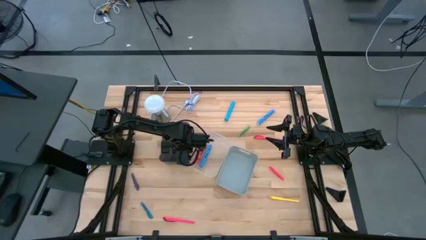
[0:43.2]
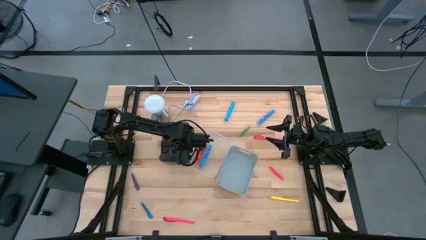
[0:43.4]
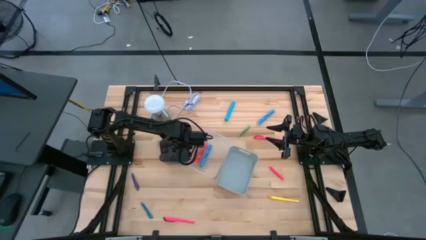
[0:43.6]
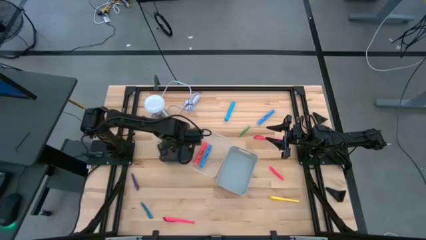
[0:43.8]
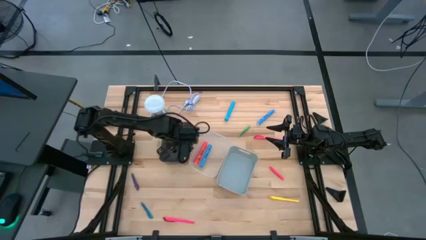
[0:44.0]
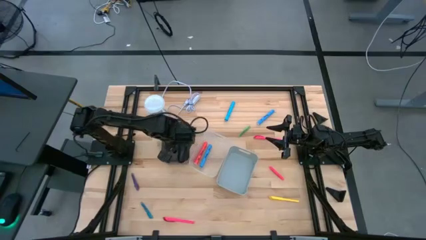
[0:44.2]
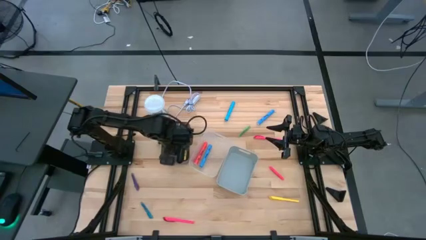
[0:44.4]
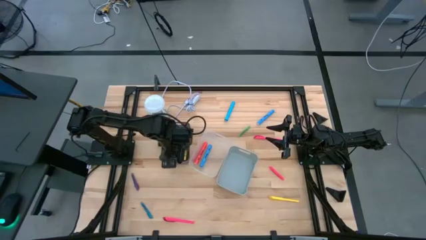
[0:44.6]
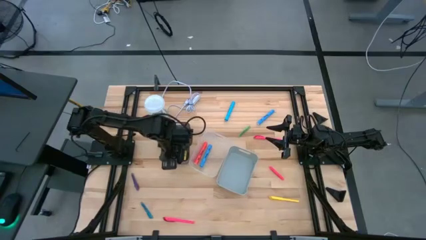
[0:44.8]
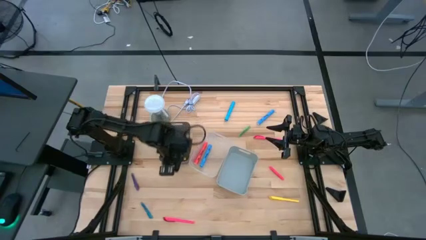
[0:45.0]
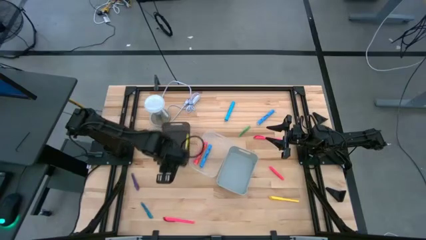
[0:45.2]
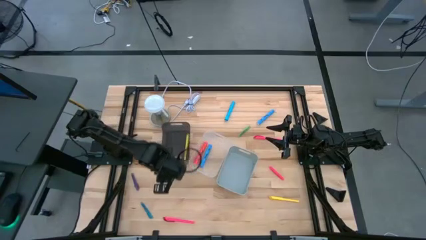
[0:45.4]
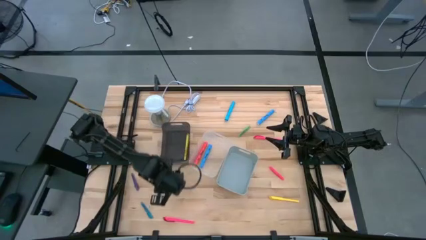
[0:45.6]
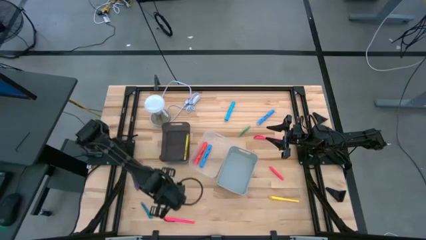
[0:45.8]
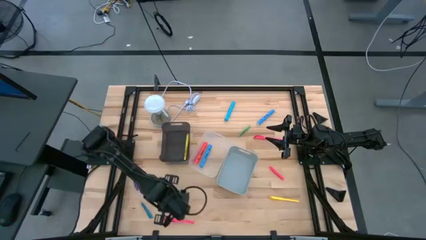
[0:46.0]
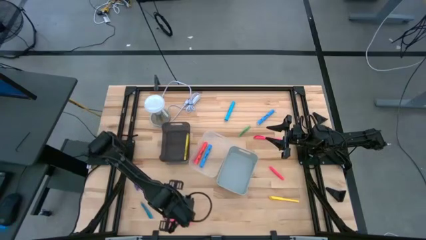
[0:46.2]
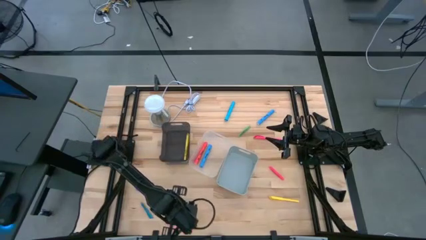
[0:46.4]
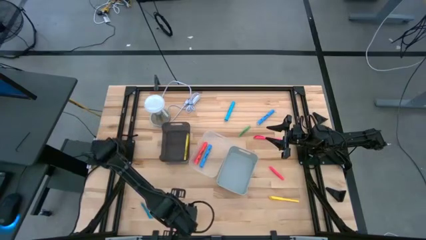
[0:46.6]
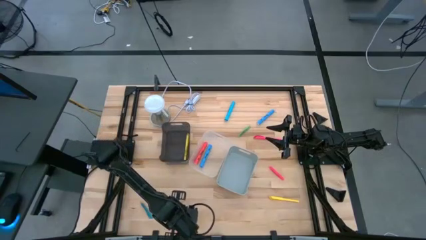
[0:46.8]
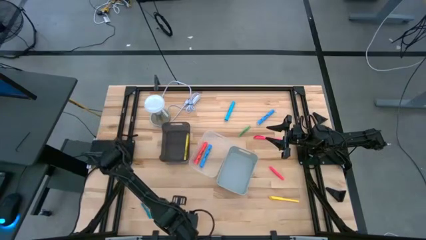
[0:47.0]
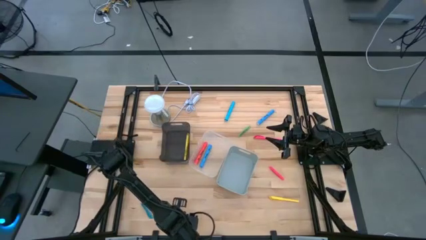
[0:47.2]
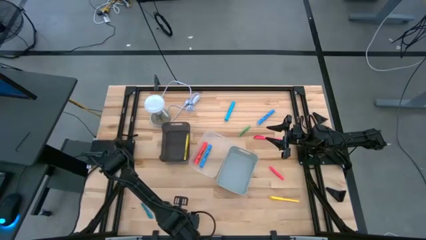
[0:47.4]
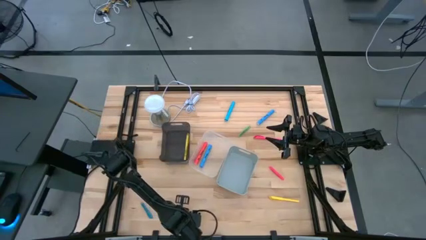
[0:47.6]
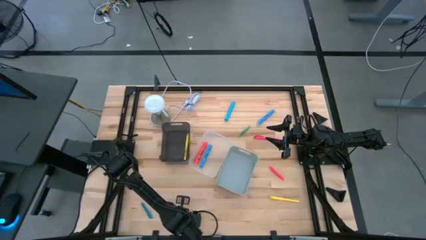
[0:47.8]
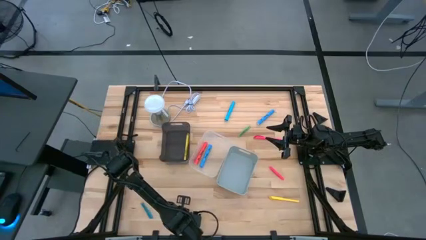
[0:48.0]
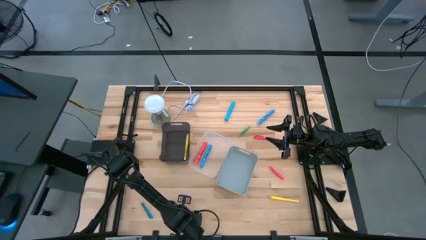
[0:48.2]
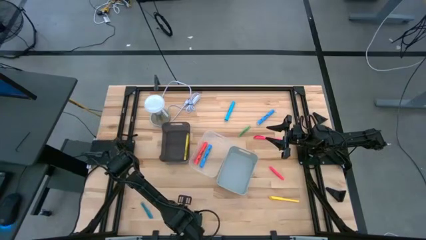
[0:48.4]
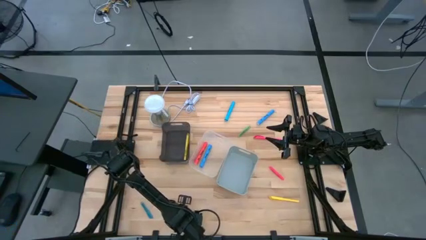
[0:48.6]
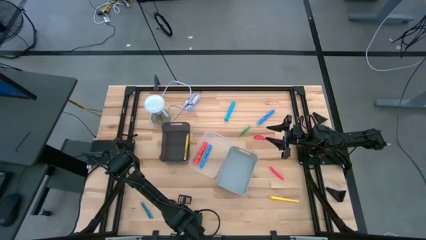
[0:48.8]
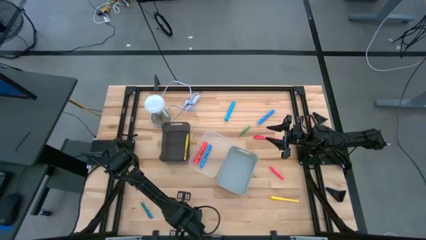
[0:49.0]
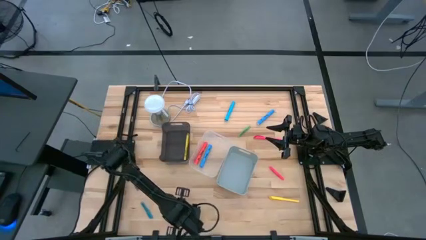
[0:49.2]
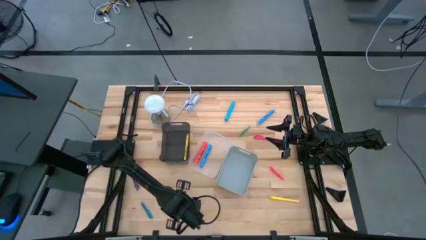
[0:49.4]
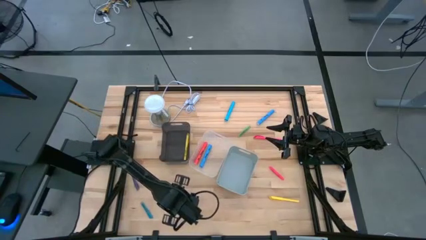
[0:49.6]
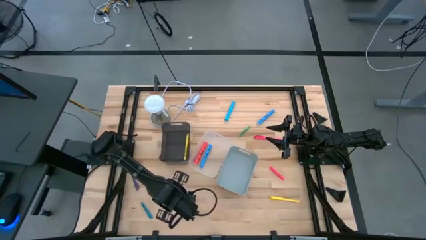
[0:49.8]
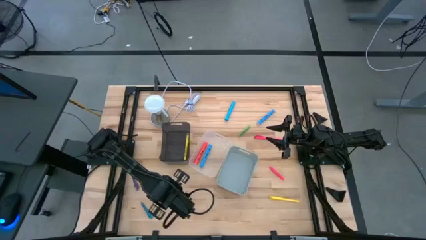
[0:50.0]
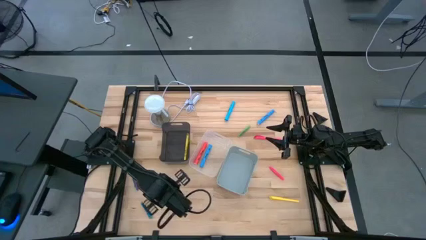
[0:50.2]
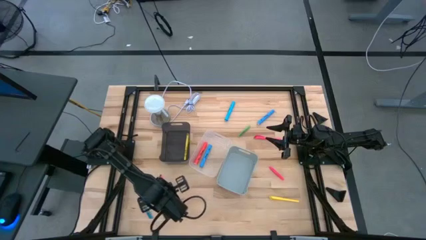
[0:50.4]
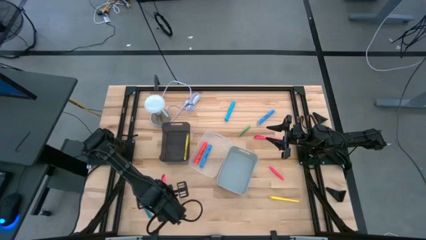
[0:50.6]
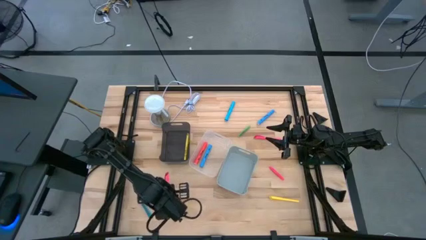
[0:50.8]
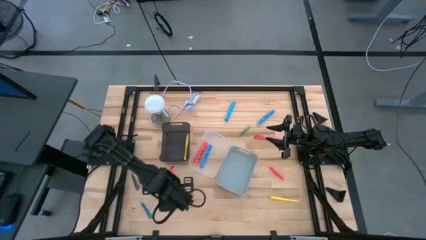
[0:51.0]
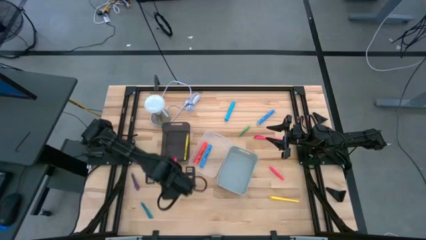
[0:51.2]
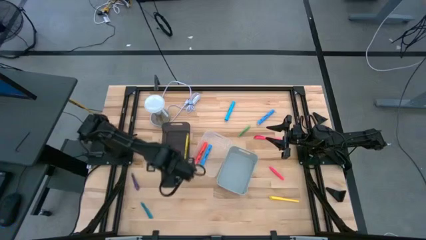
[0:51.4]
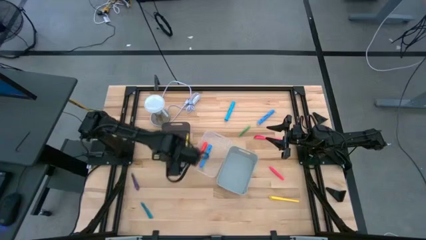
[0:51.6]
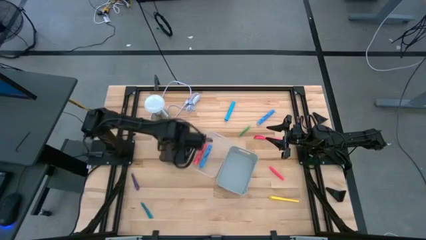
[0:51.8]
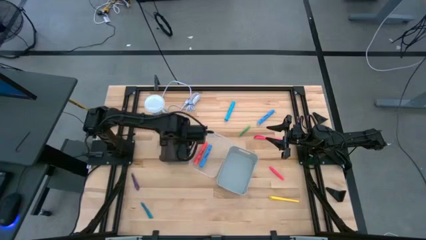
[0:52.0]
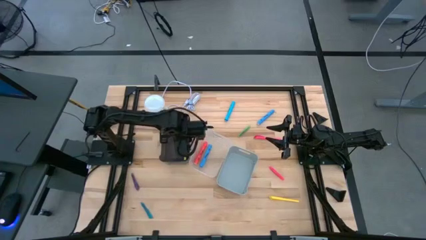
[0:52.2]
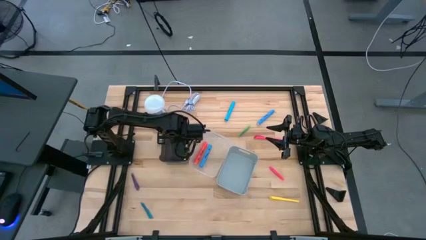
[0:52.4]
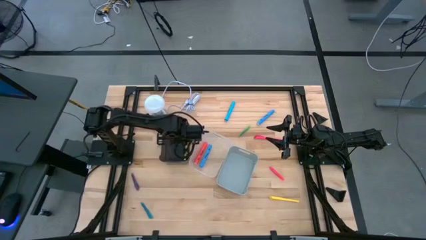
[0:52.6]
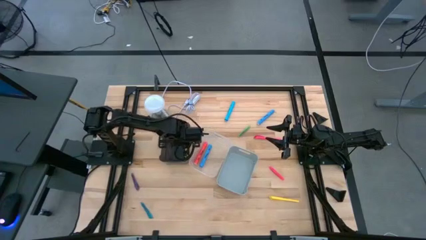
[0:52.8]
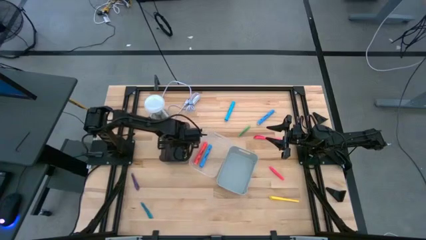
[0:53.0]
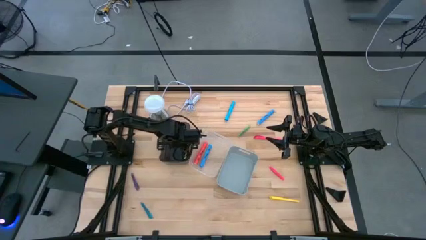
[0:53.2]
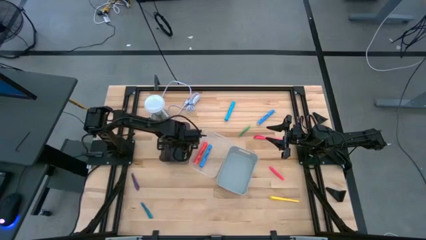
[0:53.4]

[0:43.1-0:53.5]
Task: Pick & Place Markers
Put the bottom pink marker into the black bin

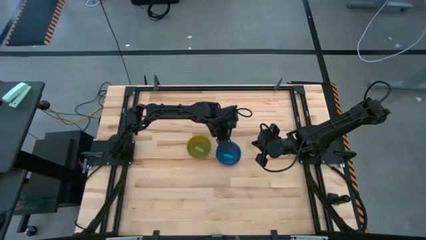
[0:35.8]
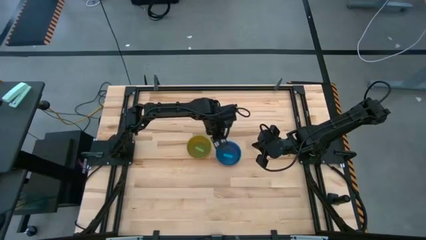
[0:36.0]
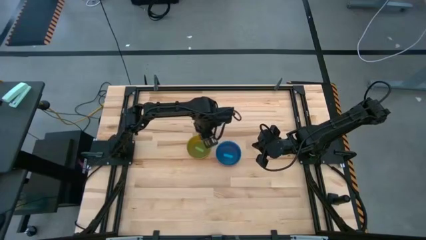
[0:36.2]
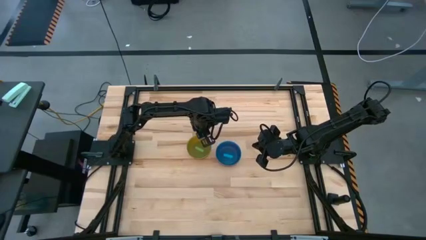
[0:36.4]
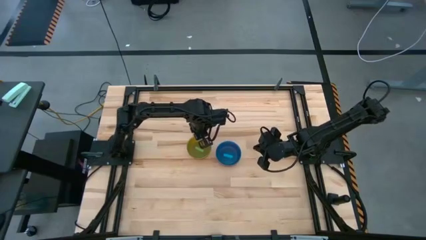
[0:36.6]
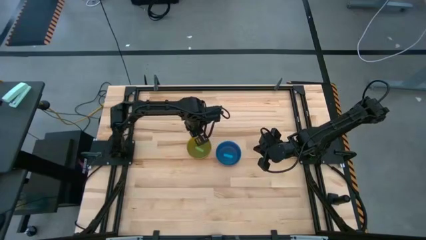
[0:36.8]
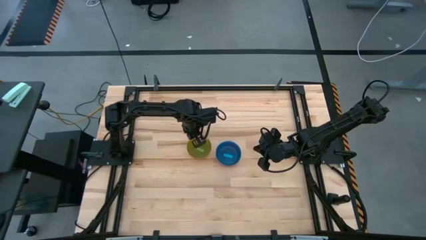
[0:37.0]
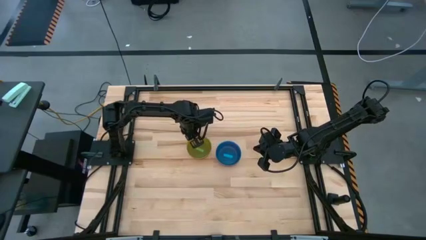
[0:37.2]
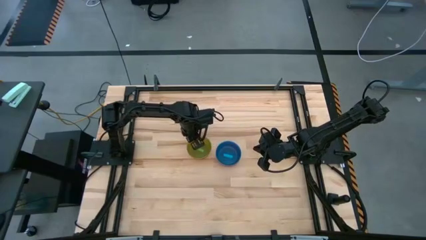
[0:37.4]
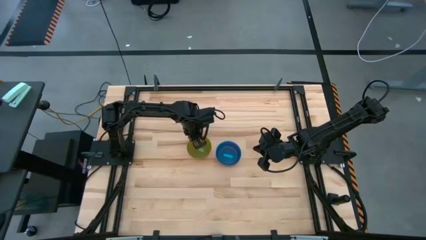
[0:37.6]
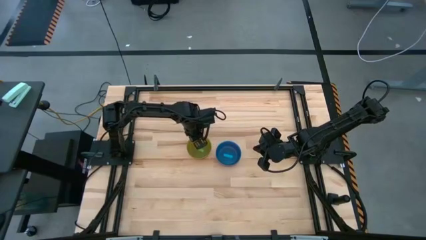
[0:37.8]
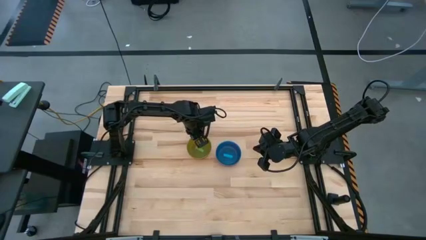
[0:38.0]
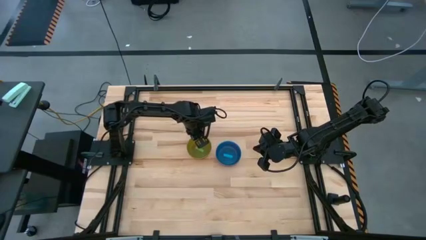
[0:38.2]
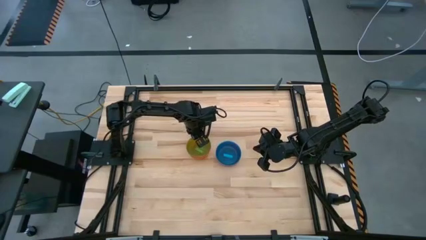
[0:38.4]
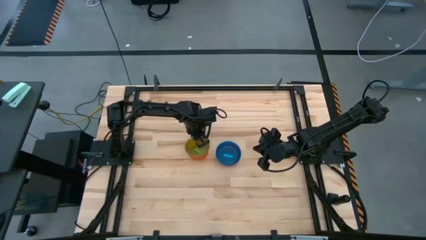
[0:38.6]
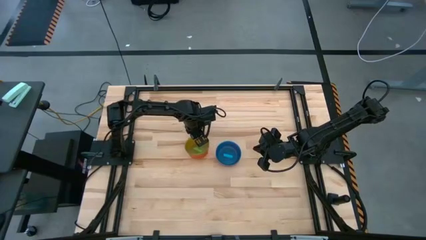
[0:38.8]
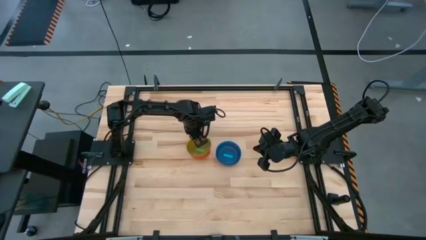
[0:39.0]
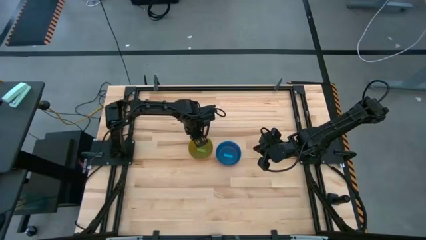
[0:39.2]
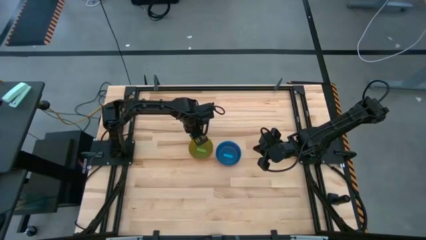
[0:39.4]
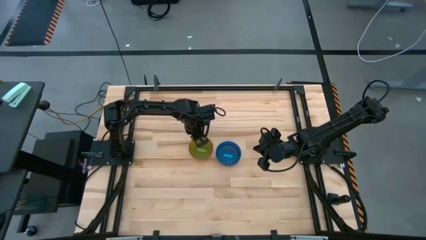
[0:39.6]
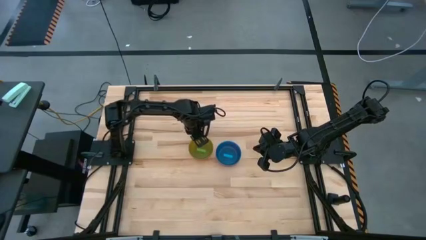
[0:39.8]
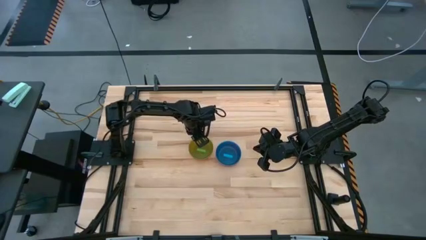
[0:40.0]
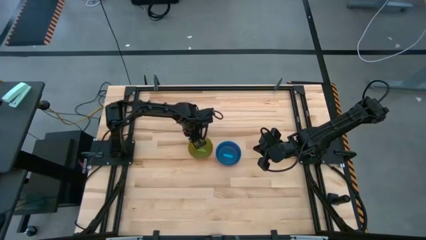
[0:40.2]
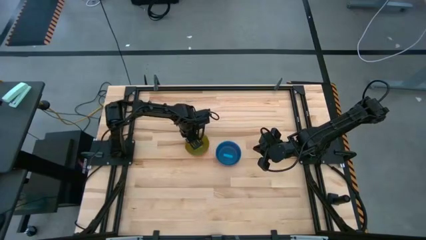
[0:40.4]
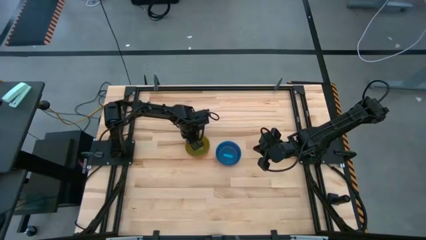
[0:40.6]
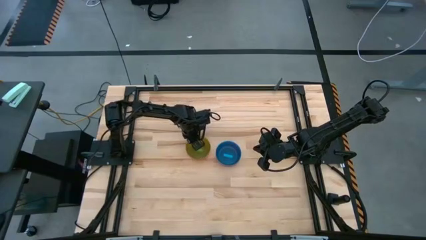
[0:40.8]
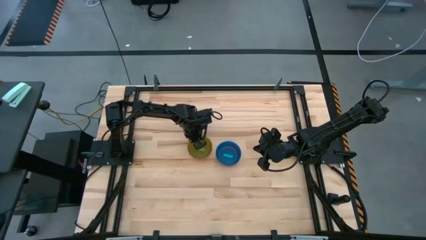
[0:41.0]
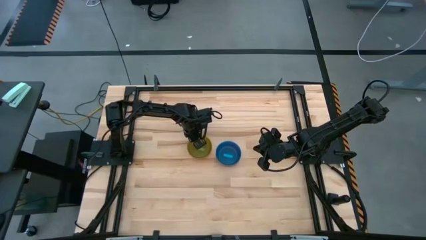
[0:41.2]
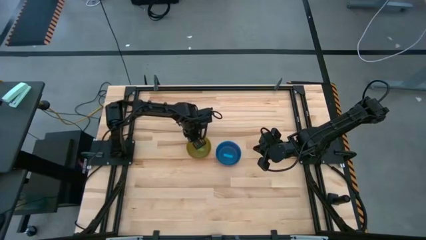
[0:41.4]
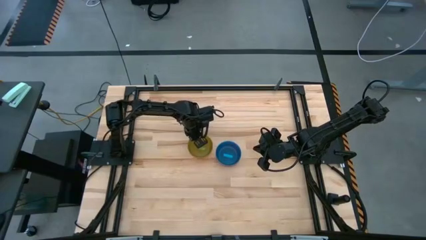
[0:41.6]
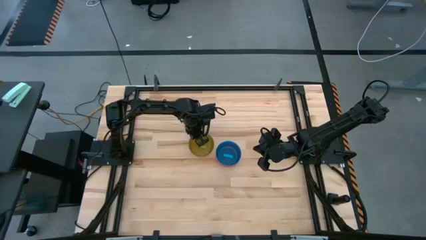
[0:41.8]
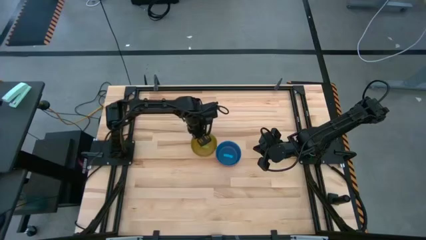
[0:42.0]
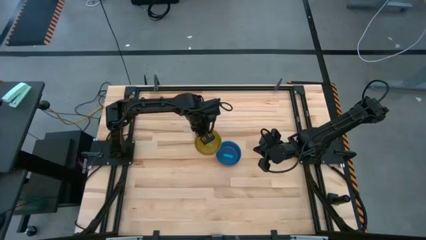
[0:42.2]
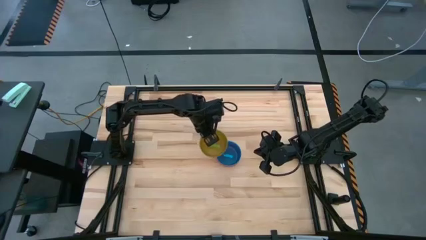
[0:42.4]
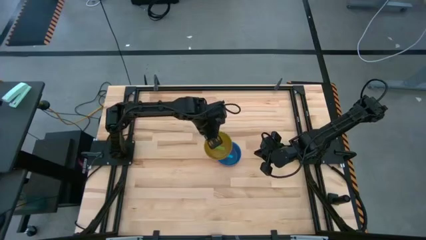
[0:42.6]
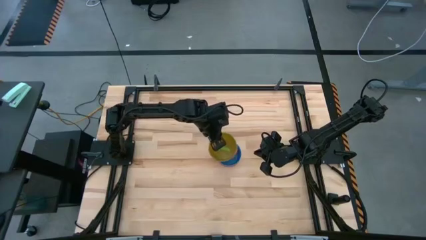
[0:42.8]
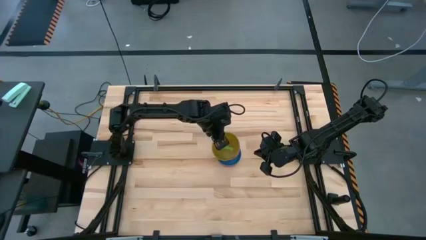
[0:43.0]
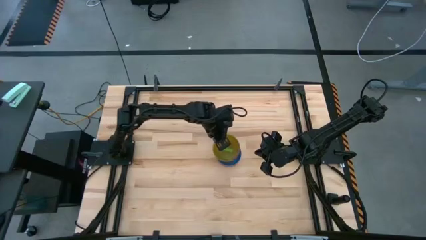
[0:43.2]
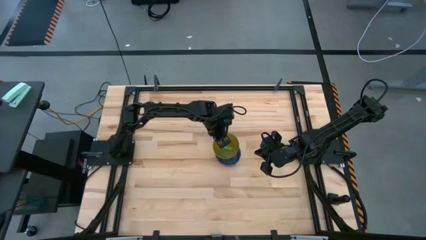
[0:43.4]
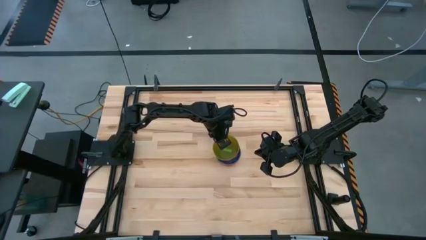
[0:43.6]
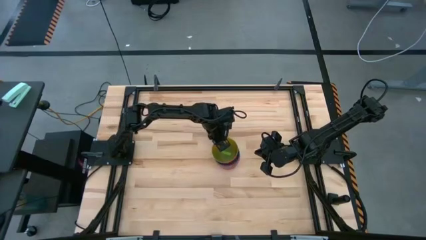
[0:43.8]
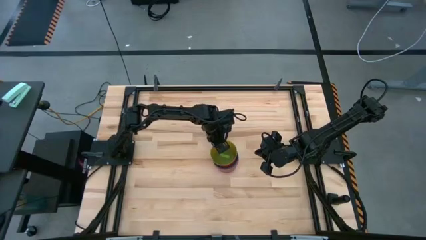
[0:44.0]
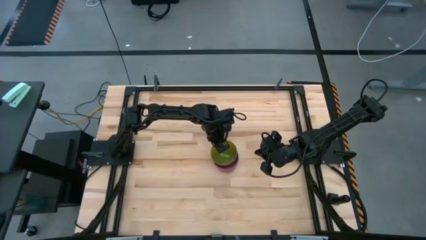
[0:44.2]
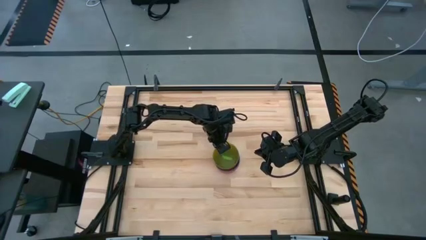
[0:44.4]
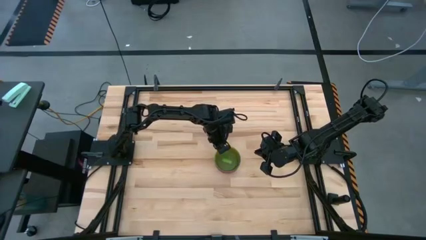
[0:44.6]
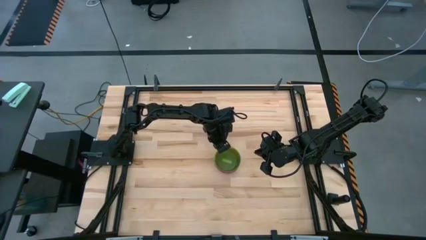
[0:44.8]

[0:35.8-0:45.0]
Task: Nest bowls inside each other
Stack the stacked bowls on the blue bowl
